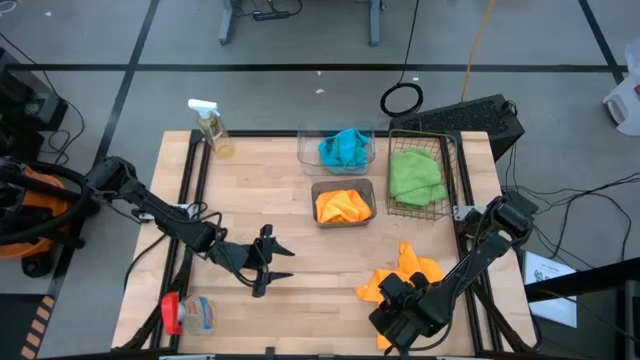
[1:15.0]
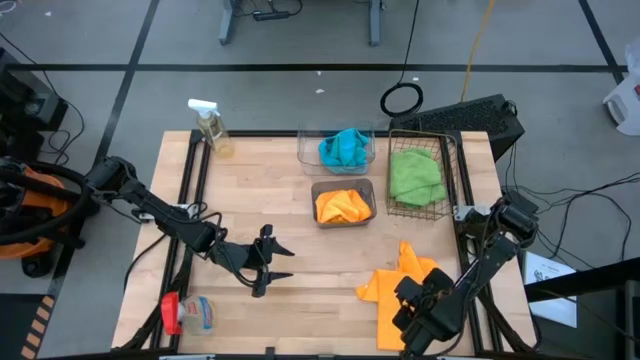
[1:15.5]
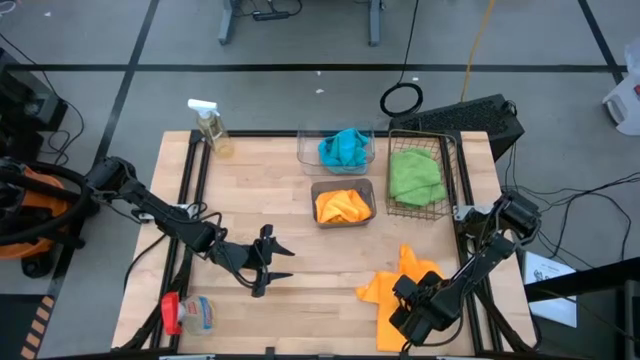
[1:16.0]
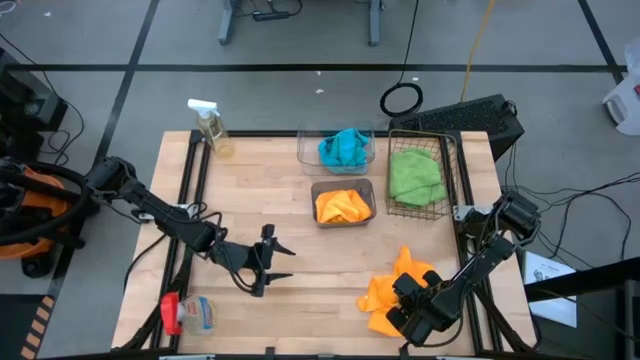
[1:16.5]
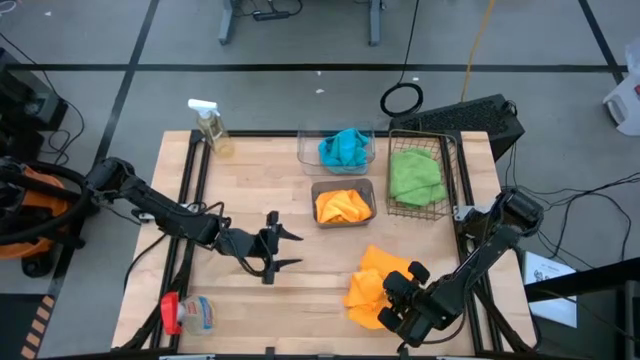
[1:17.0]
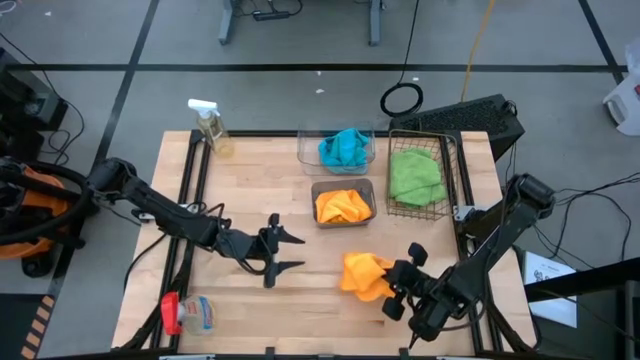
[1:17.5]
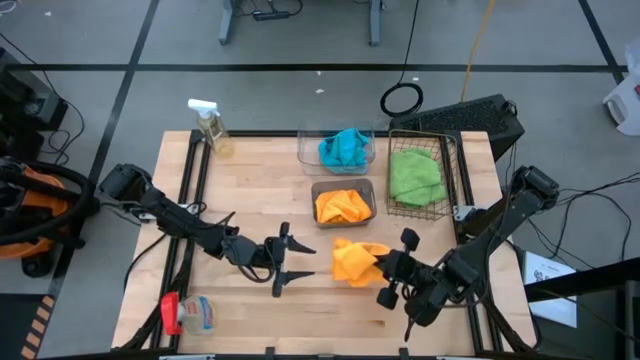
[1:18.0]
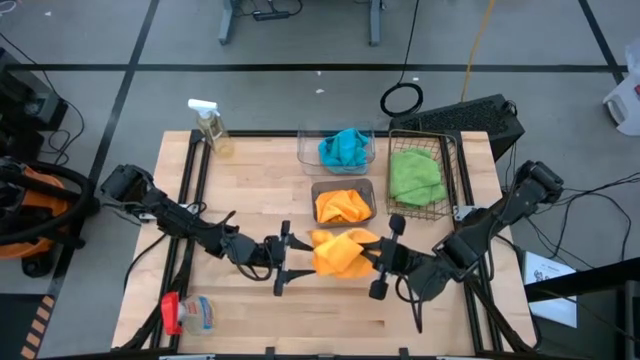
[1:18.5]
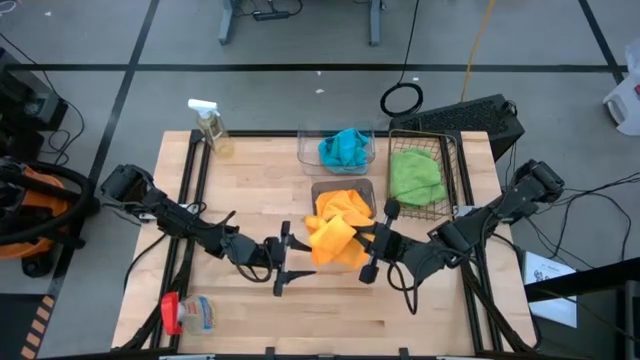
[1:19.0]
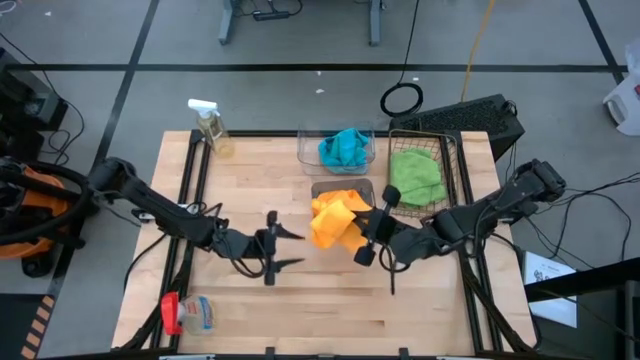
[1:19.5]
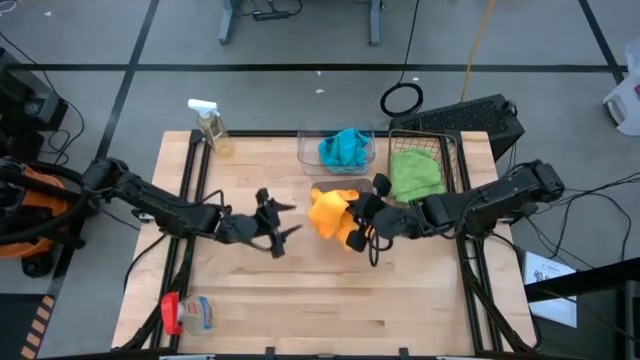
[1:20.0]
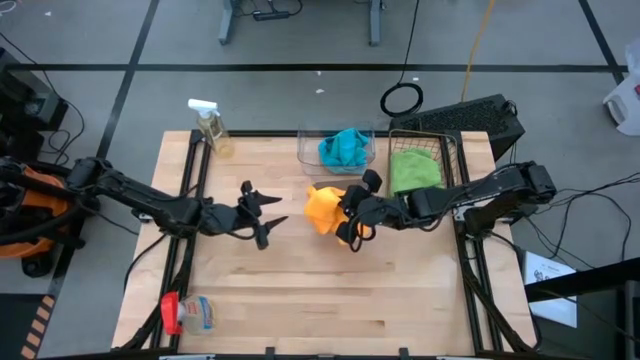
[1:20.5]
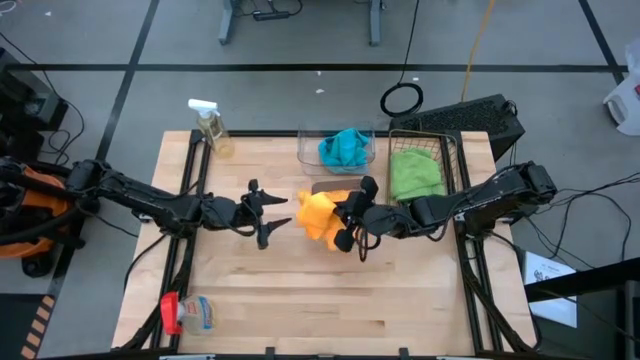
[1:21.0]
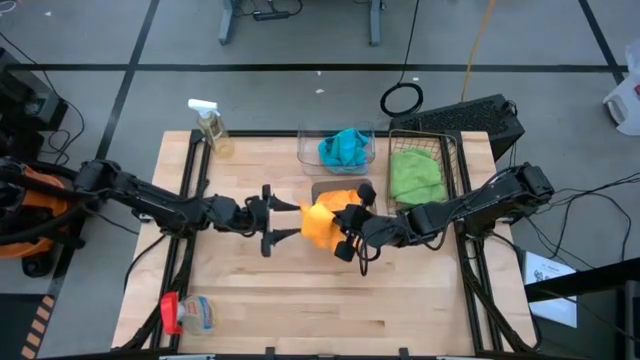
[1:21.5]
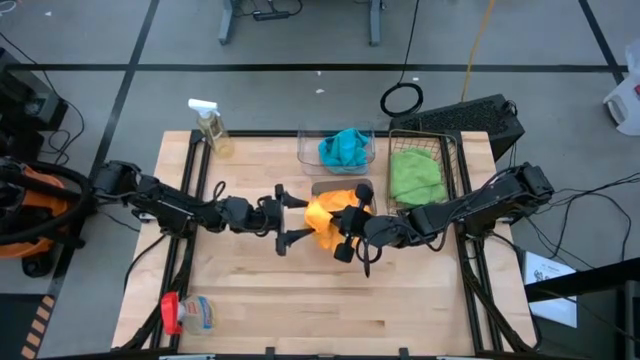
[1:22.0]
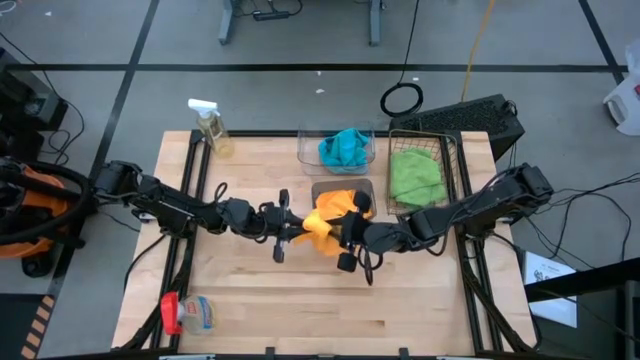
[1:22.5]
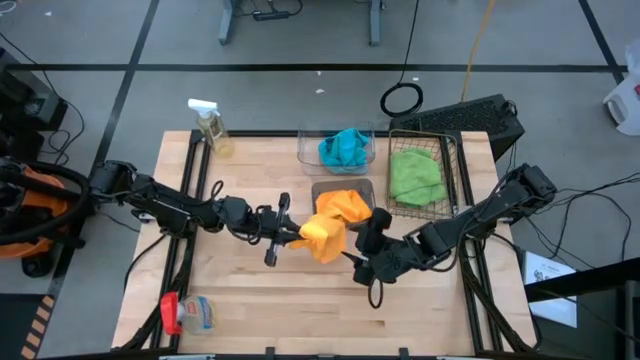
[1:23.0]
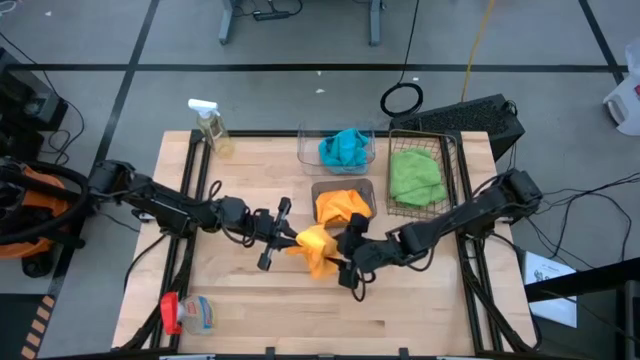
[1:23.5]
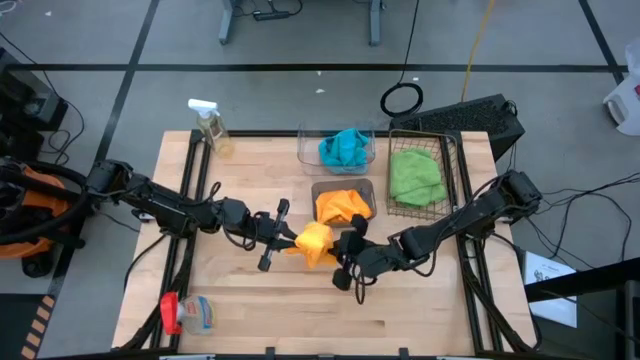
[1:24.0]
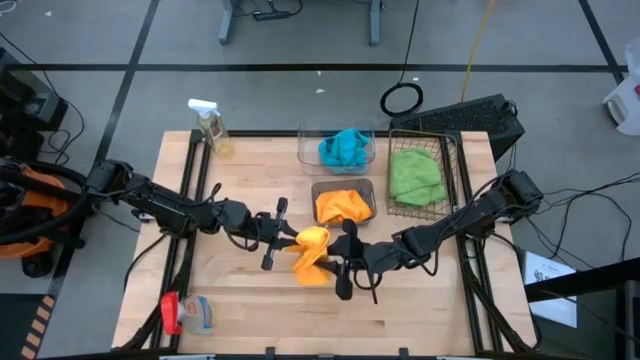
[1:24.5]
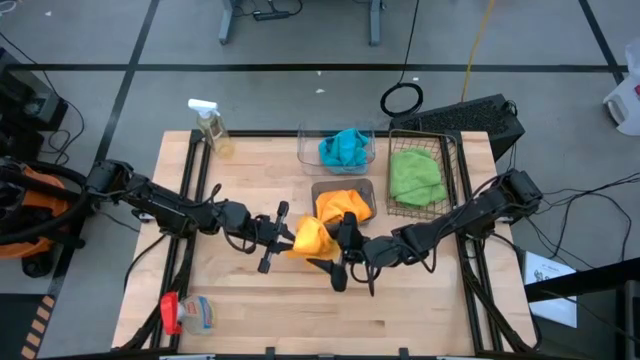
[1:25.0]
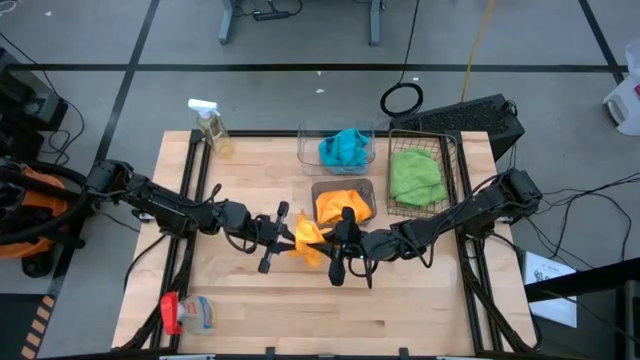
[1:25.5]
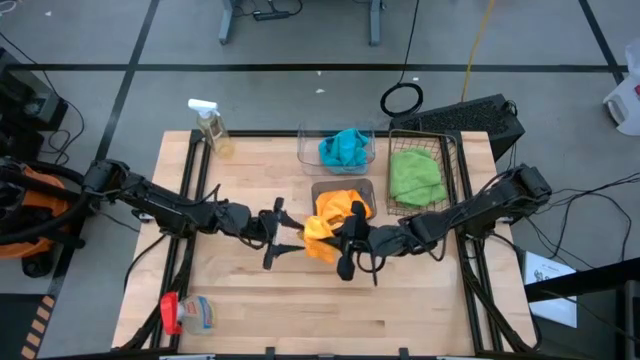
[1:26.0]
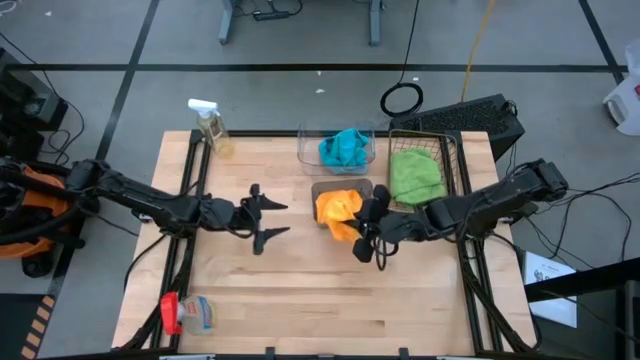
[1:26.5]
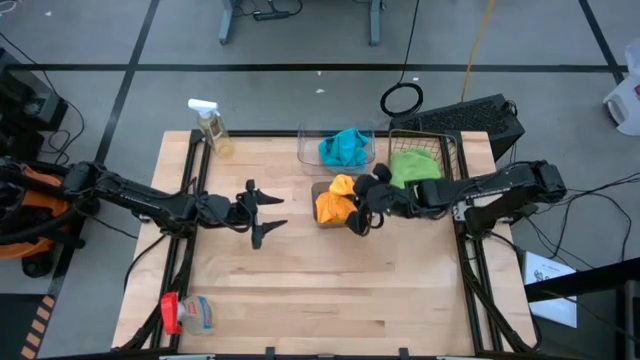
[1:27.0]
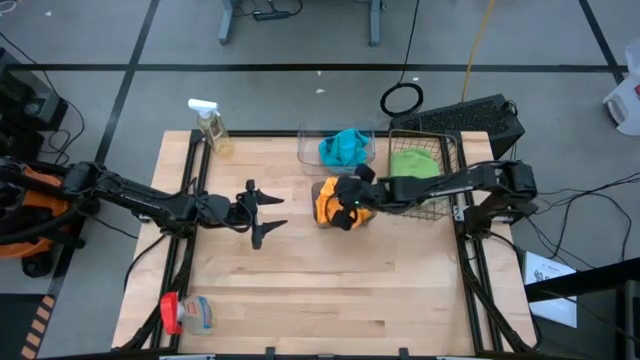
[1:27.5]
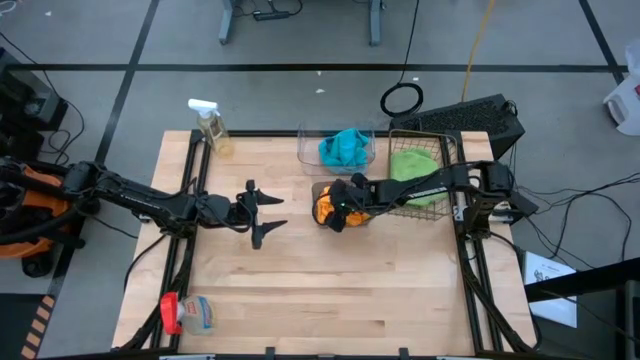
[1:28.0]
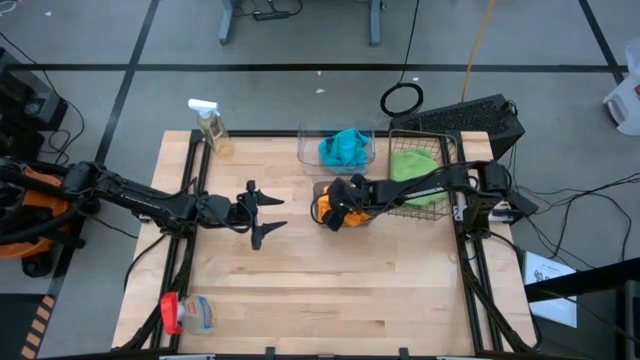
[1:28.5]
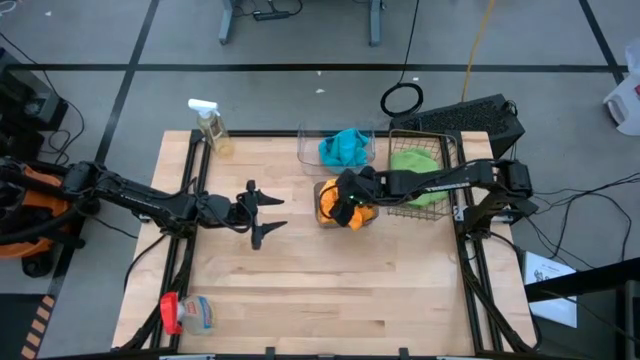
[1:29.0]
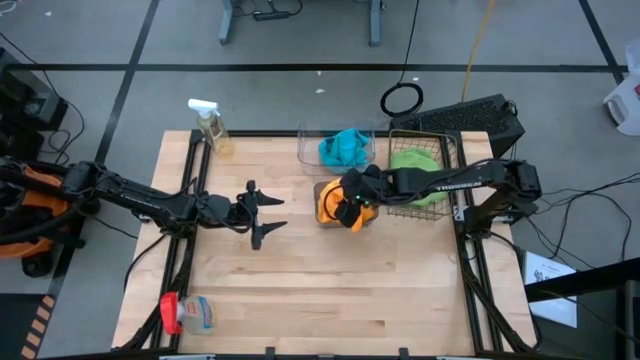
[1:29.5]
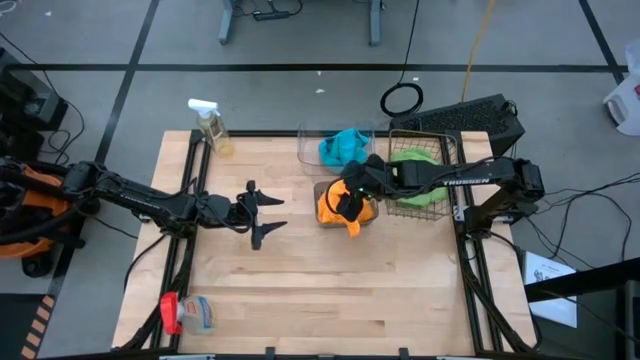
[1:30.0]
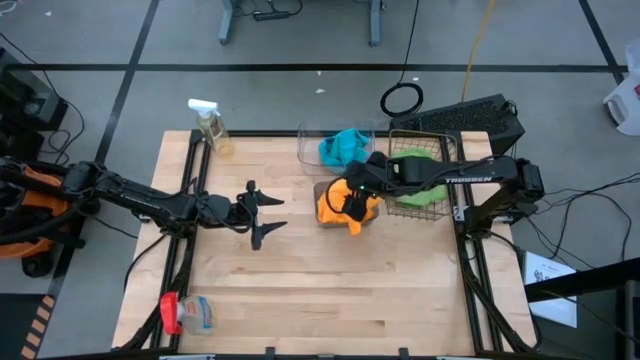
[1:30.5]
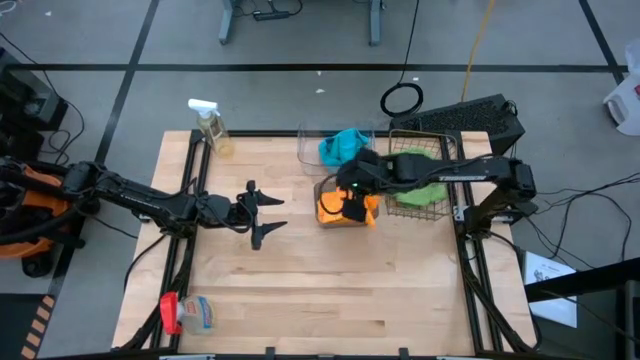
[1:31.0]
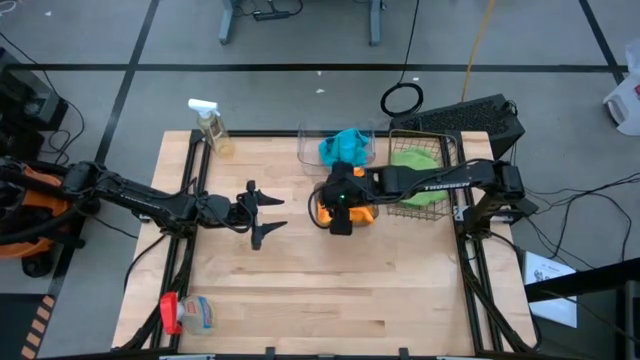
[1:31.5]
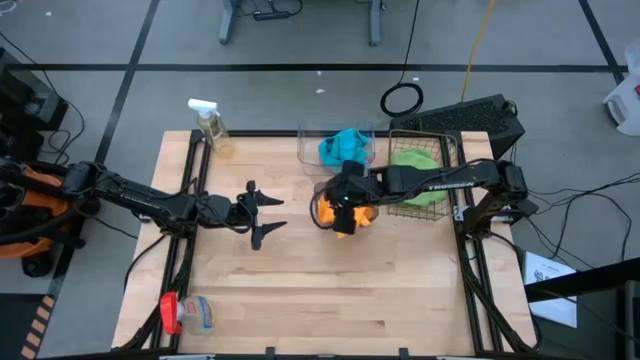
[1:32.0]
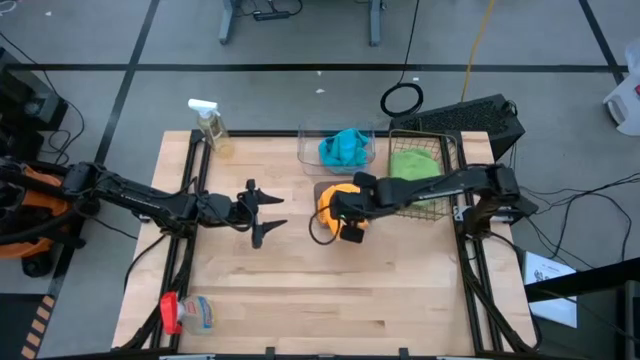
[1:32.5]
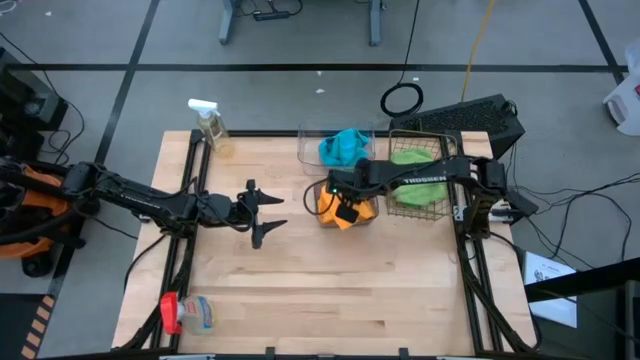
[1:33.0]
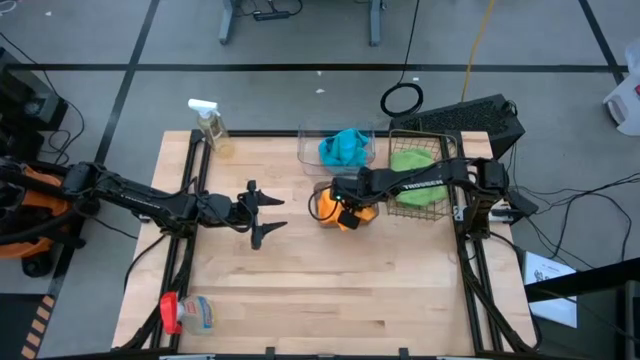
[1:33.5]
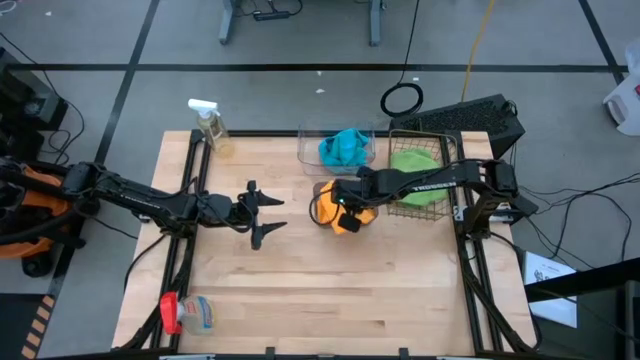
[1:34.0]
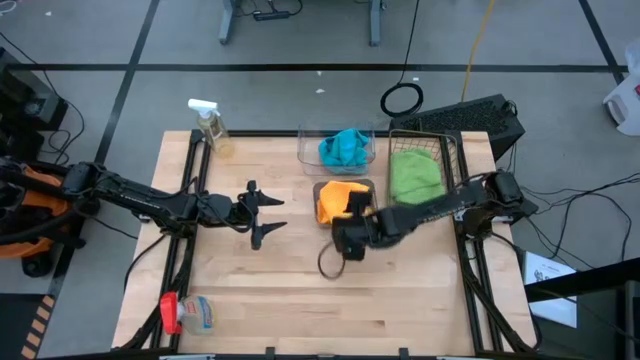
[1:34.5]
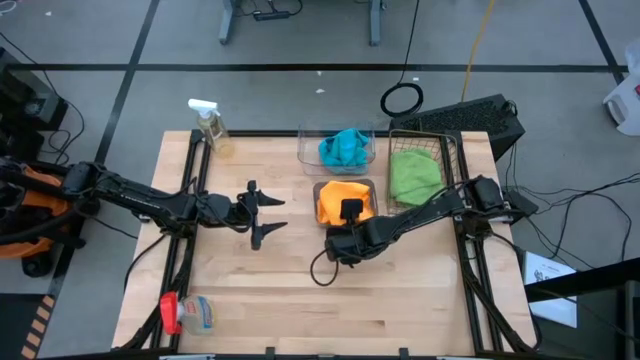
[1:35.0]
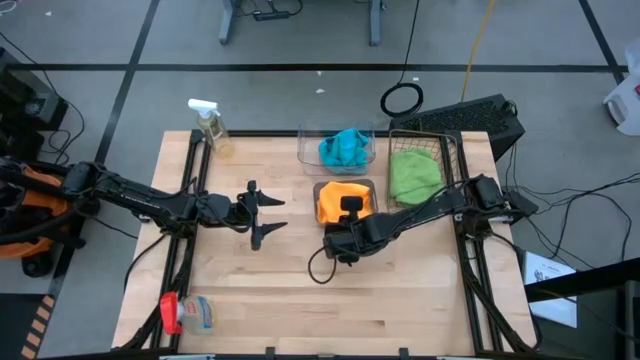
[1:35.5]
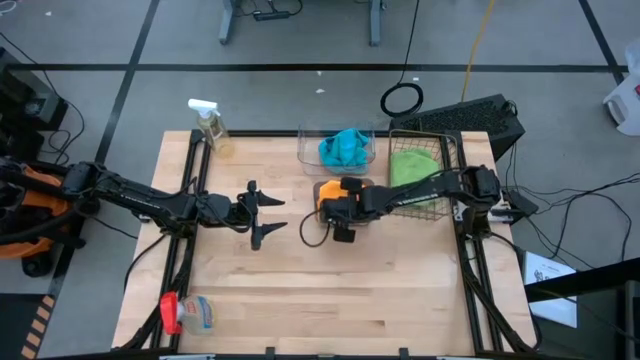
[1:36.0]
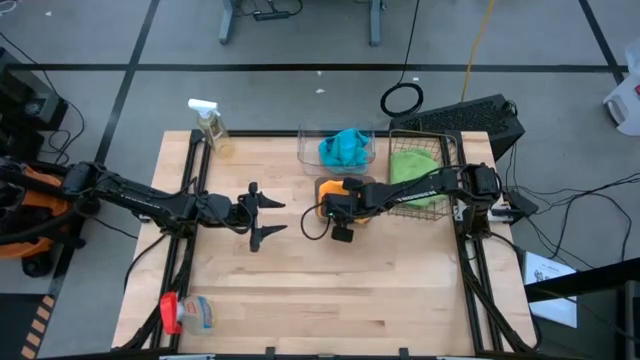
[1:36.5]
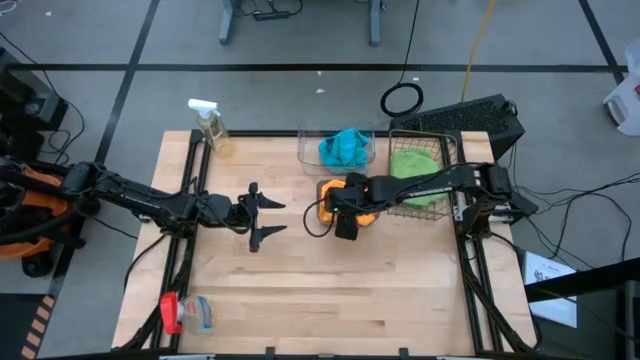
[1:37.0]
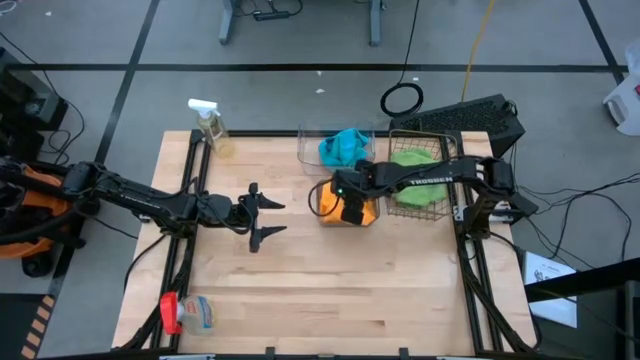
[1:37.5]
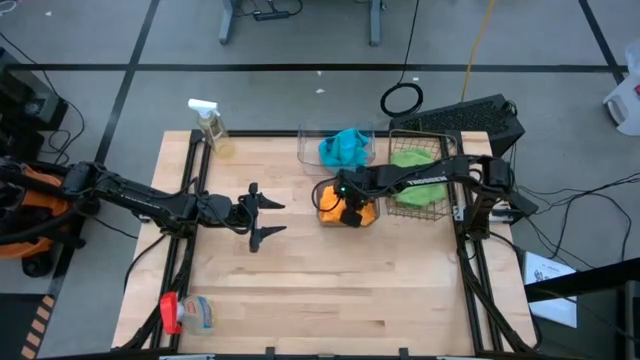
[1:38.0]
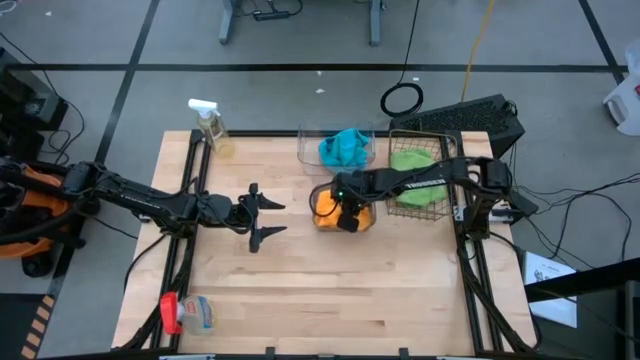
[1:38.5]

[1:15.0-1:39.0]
Task: Sort microfiber towel by color & place in baskets
Put the orange towel into the black bin
